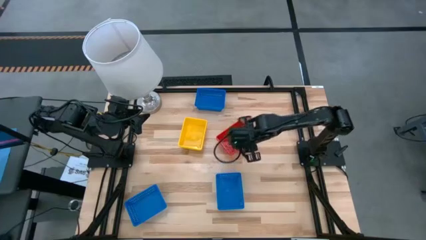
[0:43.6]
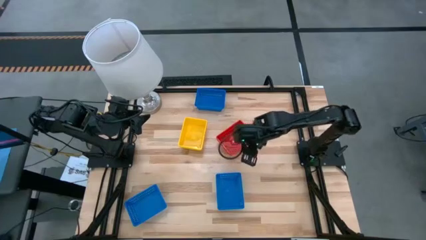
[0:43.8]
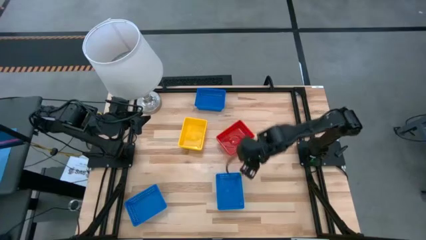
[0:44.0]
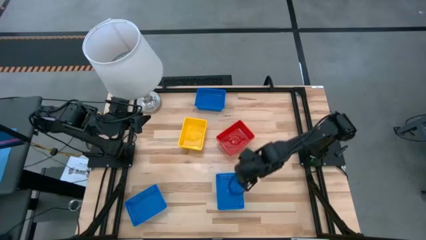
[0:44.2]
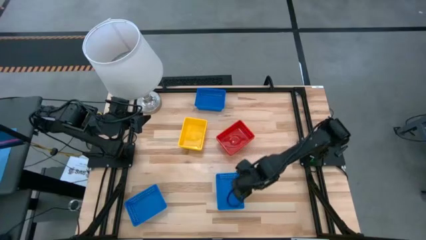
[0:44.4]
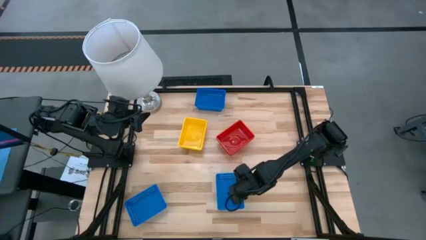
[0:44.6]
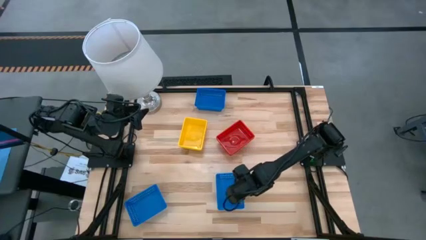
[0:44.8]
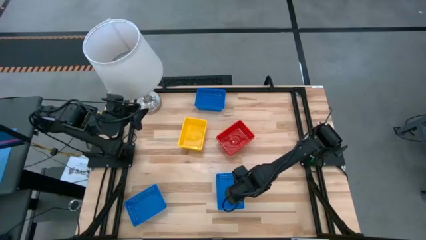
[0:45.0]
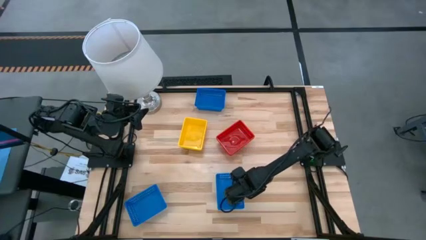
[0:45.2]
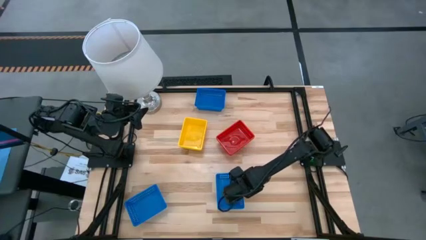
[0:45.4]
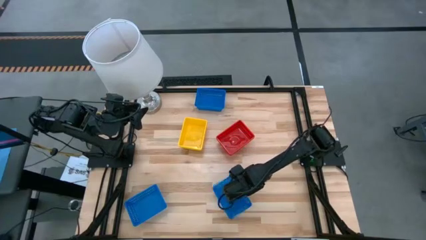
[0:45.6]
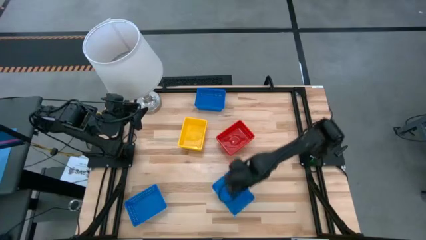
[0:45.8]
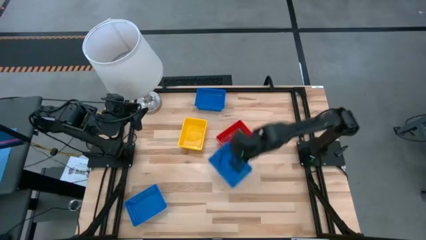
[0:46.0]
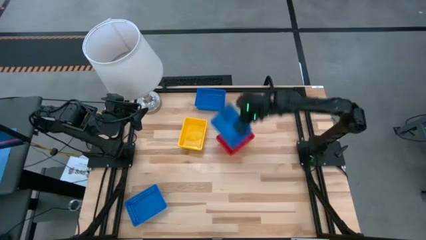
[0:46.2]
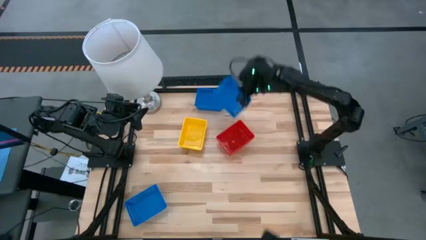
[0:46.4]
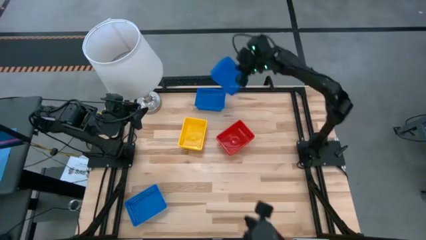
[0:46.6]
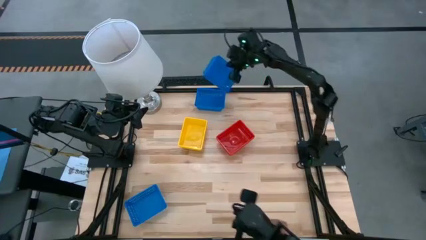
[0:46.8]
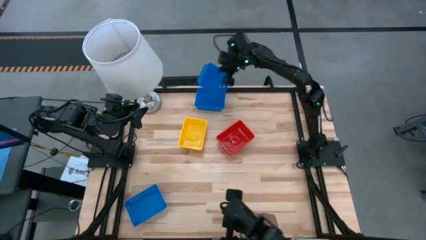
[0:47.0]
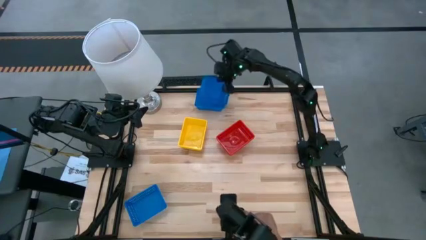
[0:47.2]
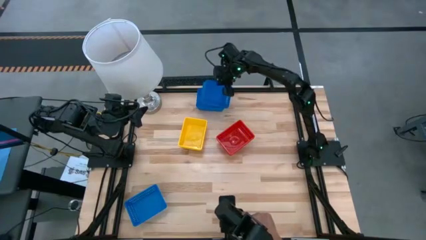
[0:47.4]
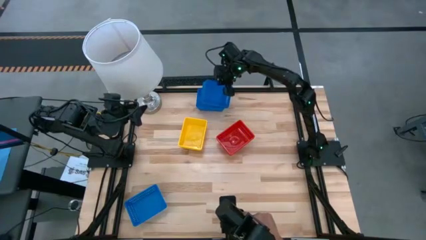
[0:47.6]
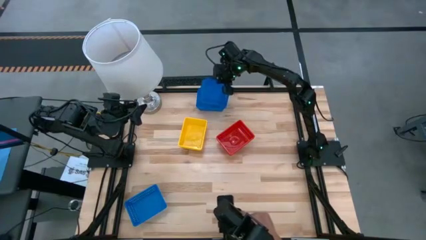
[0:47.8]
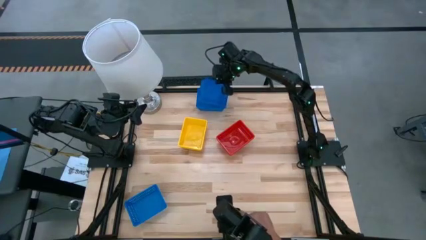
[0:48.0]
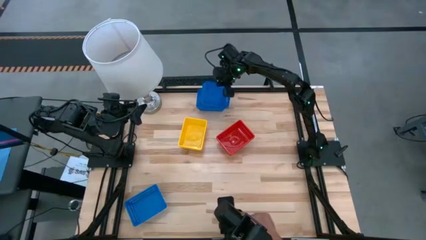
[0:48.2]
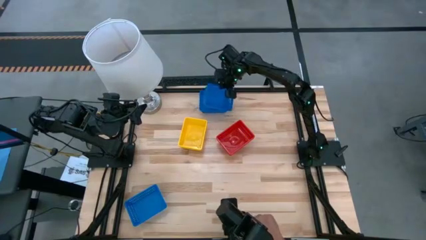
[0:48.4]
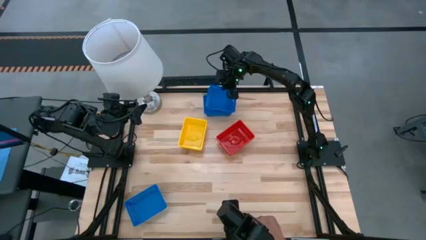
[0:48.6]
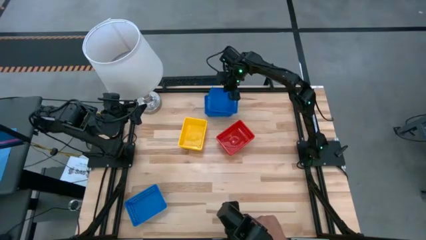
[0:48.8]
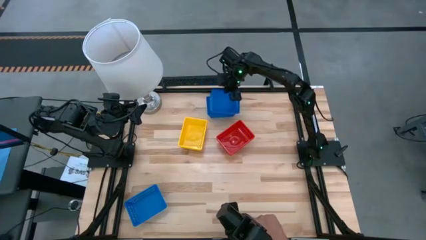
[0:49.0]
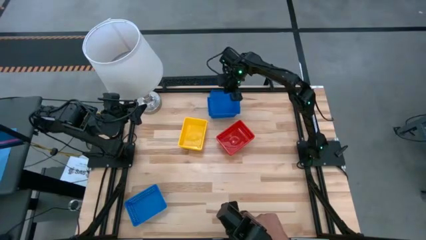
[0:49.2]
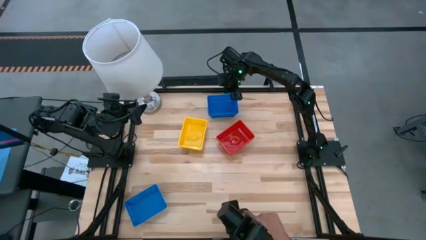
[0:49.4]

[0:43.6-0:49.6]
Stack the bottom right blue basket on the top blue basket

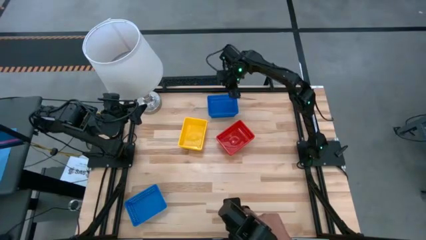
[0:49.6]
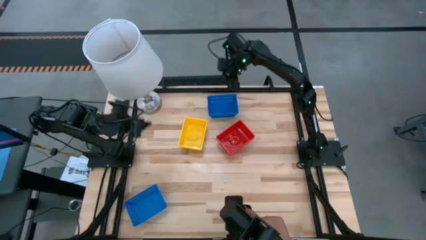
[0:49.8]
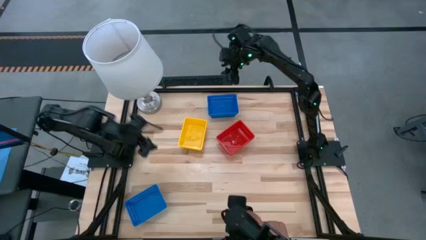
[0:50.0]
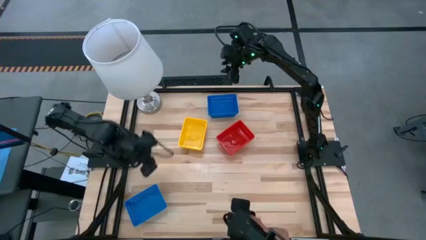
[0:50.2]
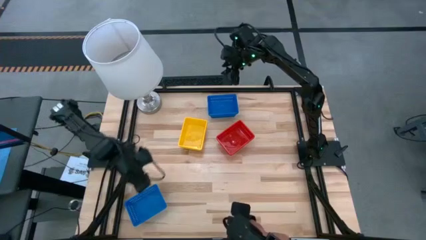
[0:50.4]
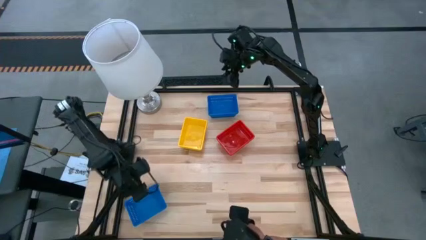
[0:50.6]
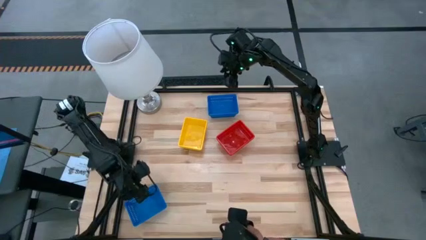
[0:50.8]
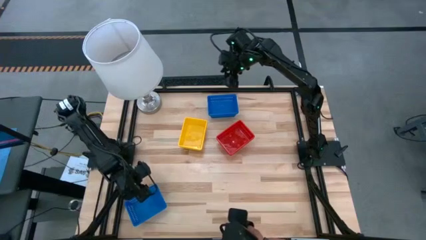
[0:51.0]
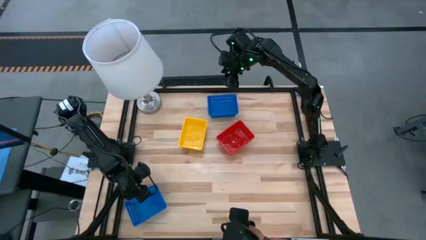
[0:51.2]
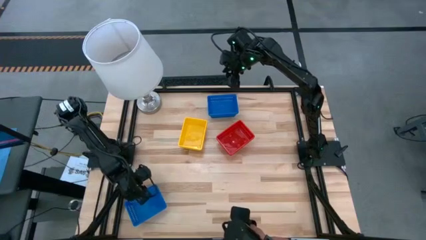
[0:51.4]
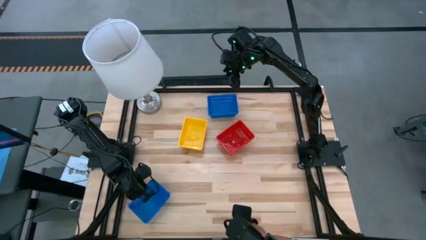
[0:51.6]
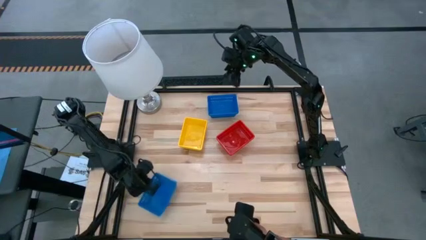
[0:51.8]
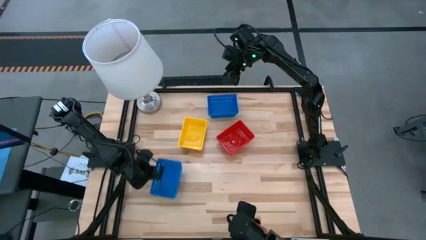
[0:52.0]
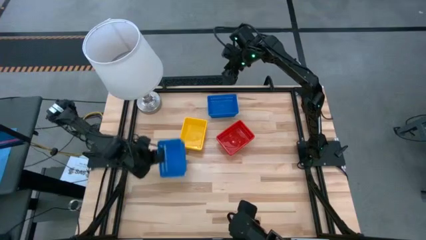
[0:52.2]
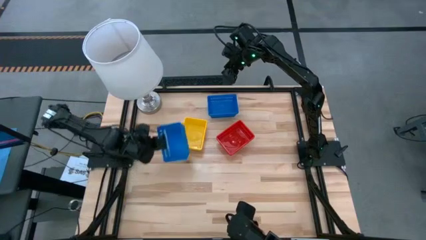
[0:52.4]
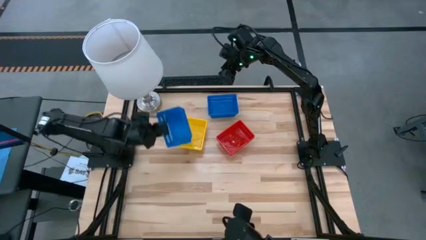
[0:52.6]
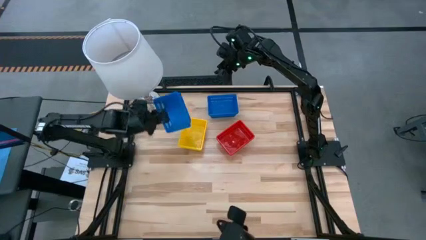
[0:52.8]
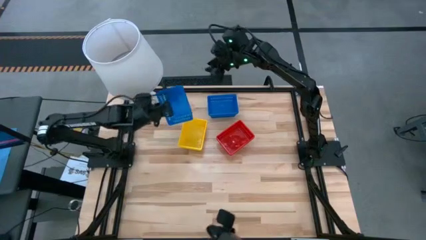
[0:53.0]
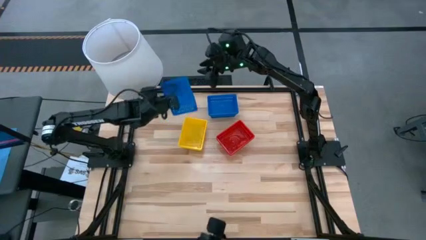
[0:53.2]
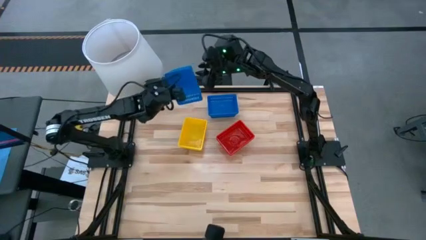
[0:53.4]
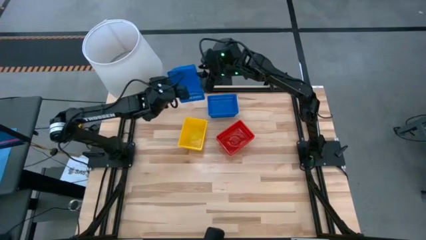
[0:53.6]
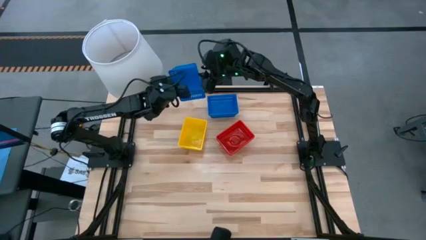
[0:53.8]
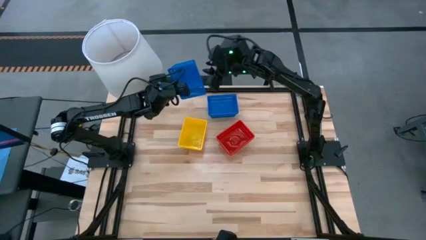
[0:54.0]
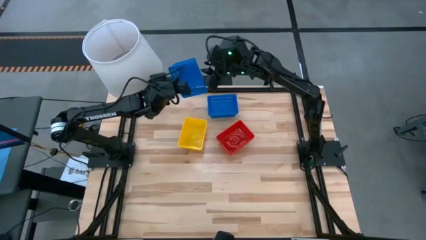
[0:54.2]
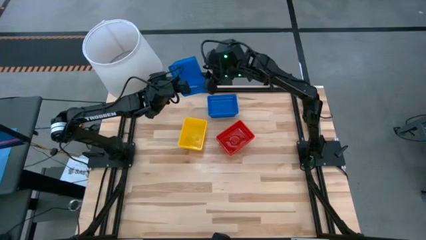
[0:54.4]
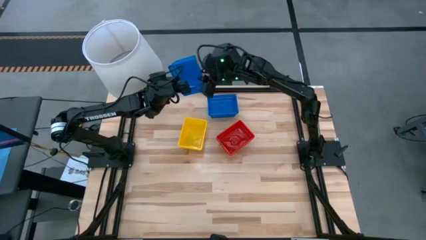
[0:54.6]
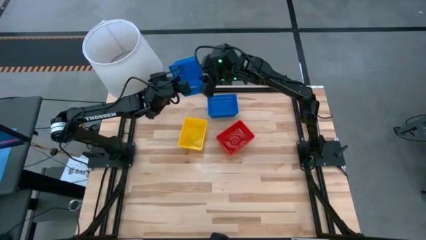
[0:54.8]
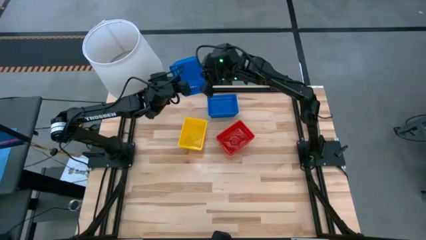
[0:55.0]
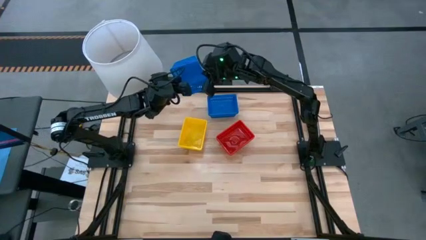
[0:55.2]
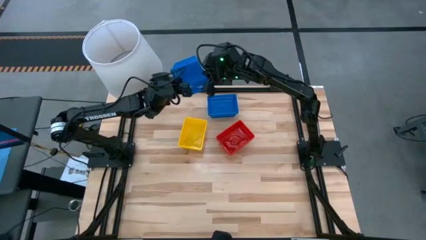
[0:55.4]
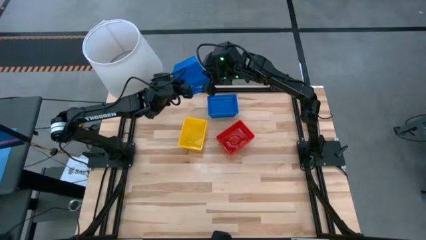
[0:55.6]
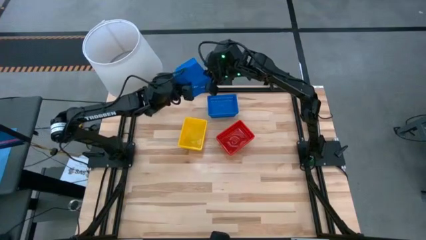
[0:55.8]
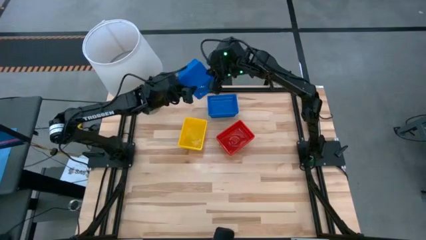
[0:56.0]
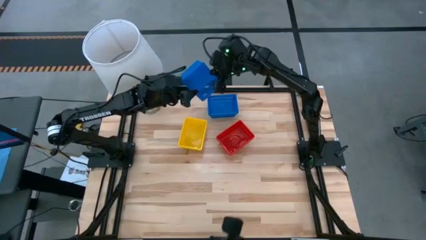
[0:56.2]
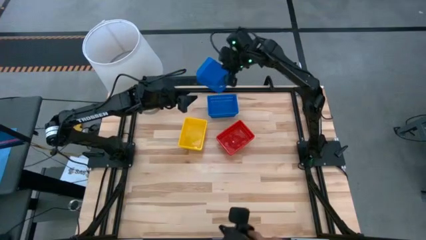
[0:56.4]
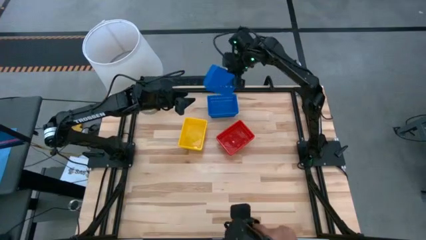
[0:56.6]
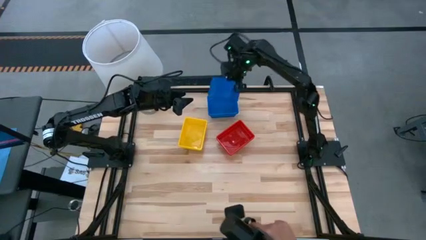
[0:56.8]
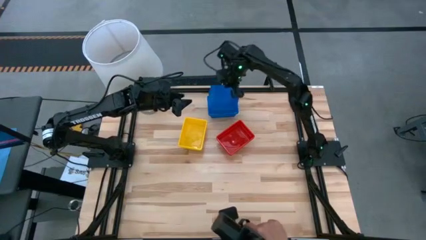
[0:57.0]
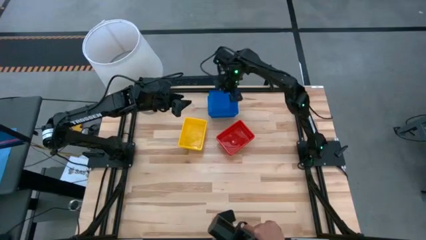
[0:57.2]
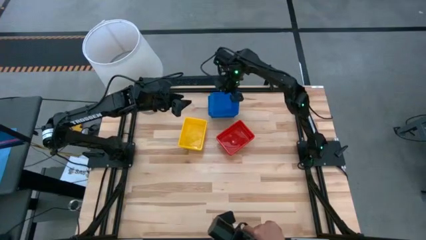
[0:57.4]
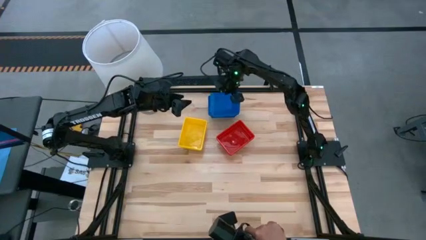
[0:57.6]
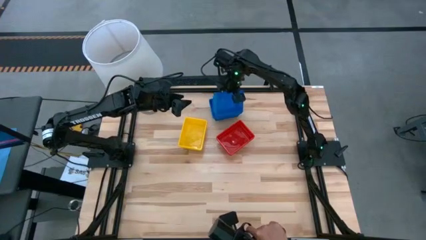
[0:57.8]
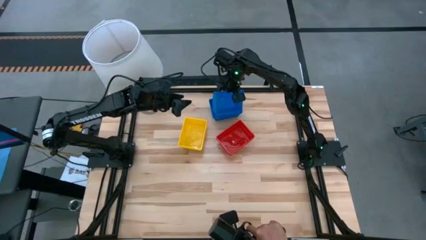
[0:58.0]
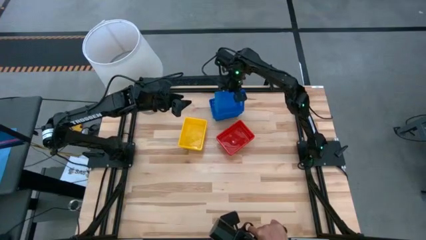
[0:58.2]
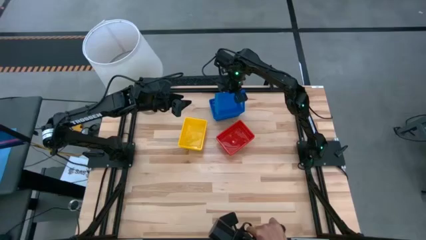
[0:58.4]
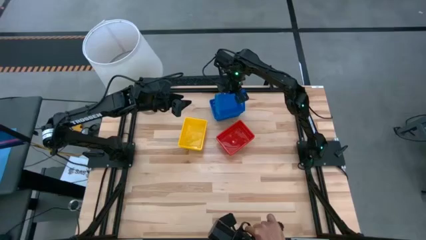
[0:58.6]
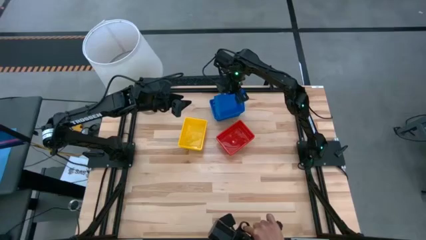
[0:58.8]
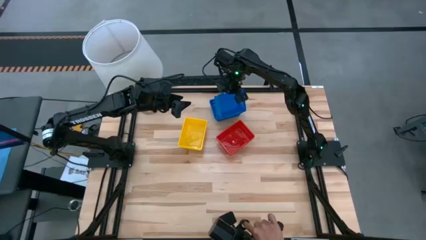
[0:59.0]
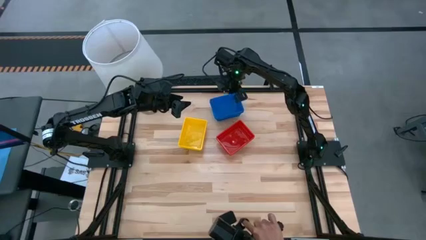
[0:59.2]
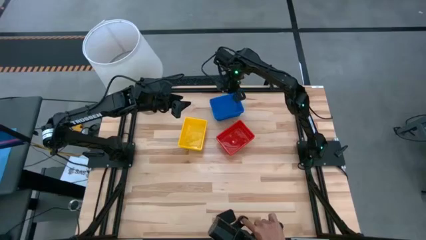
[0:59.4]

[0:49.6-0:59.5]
Stack the bottom blue basket on the top blue basket
